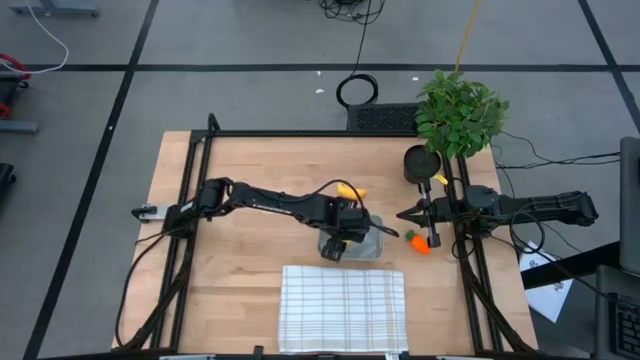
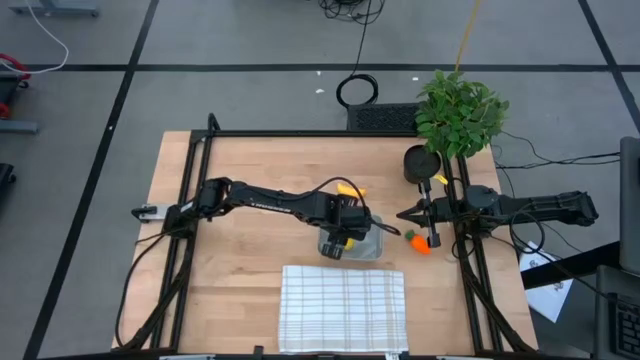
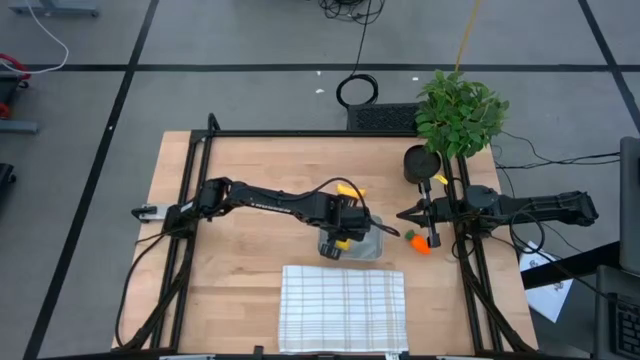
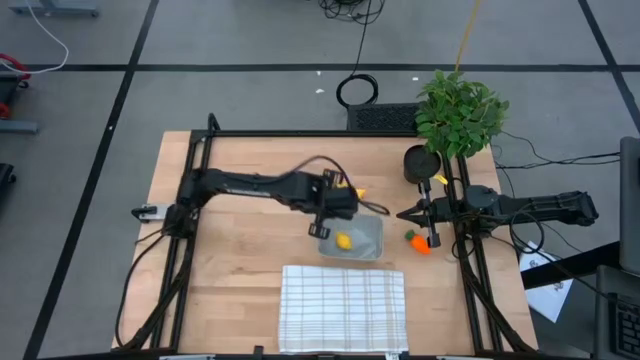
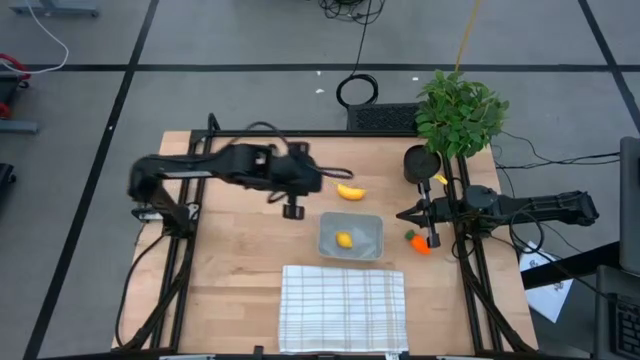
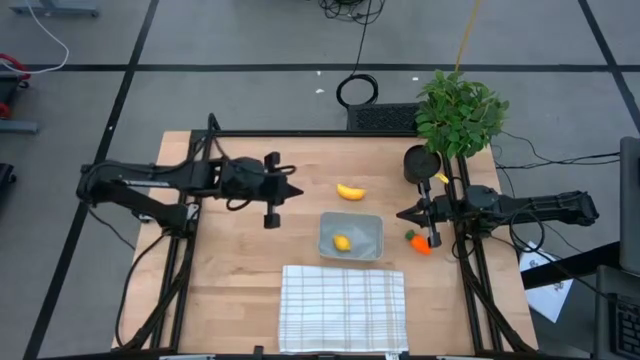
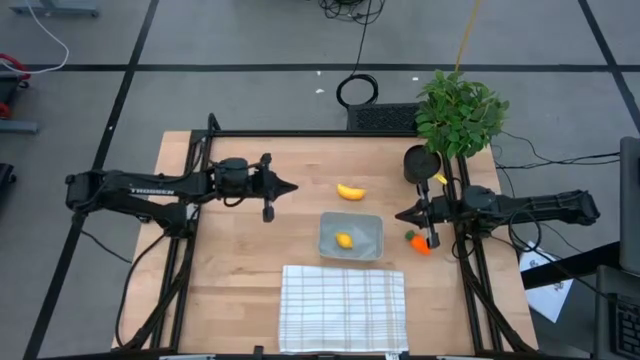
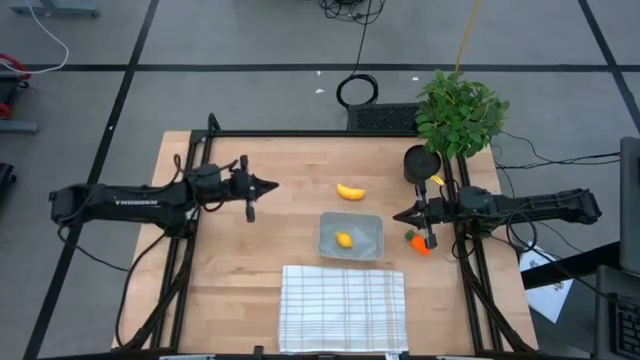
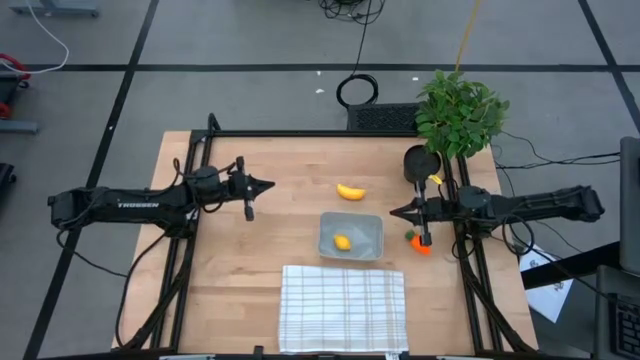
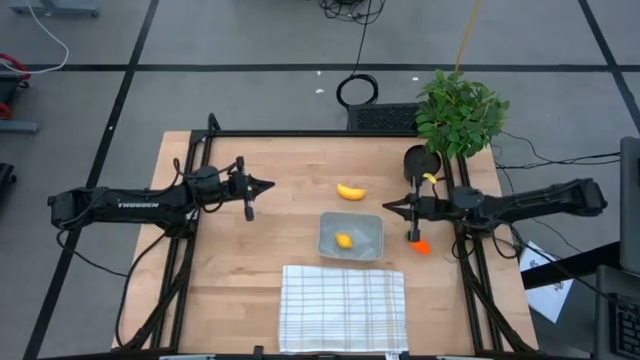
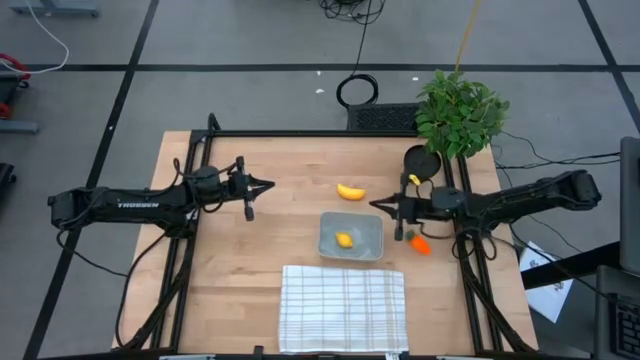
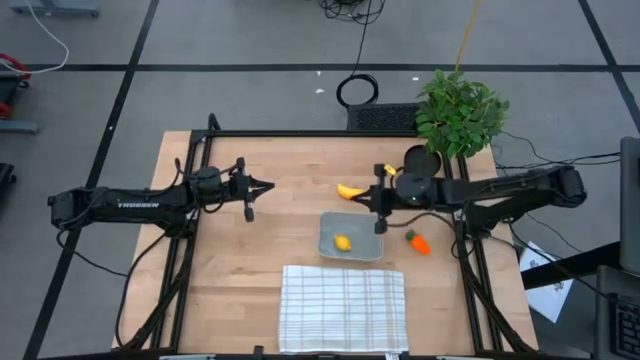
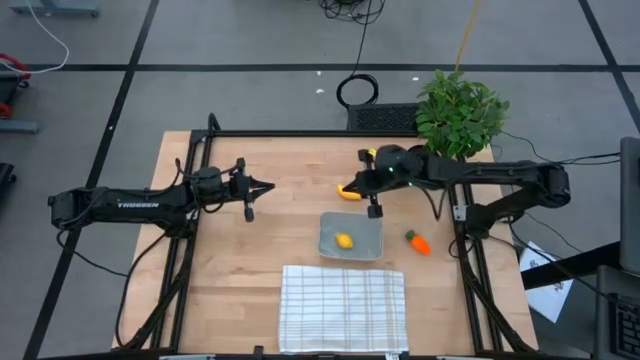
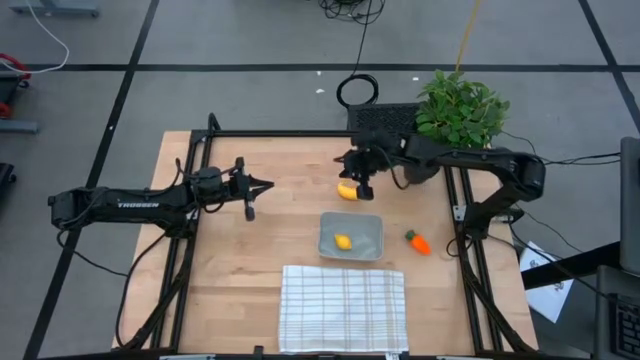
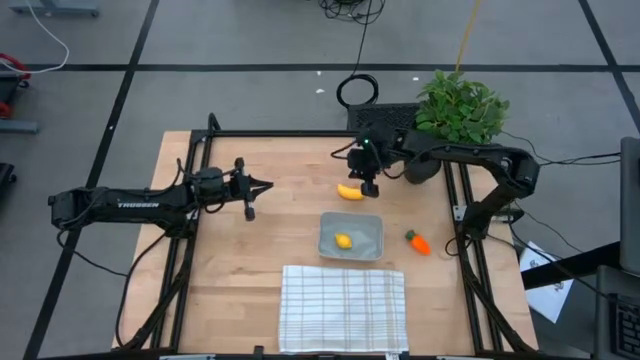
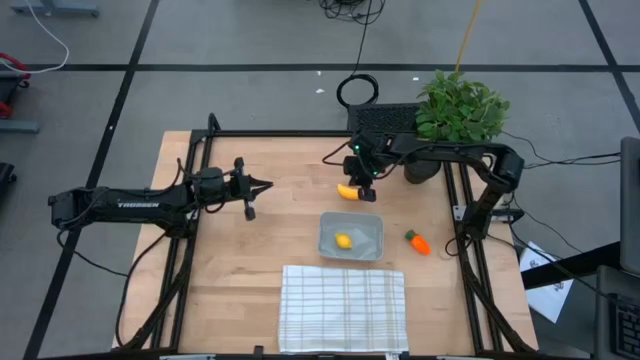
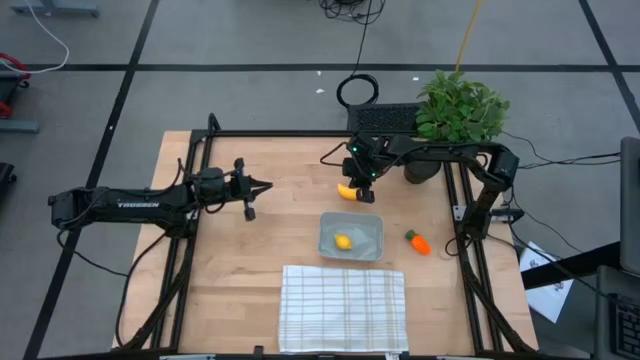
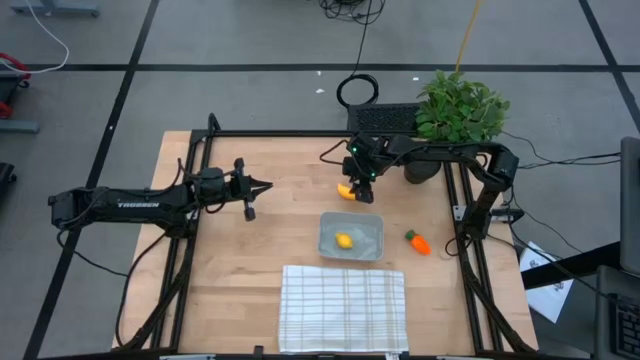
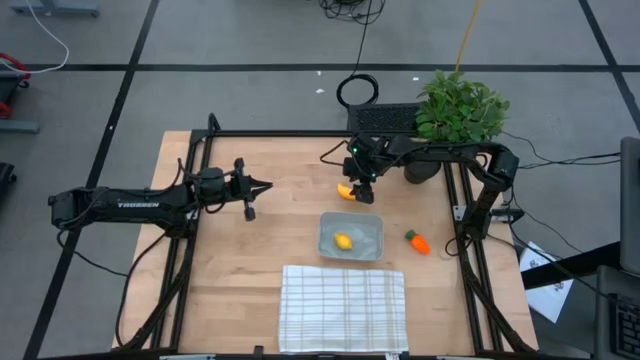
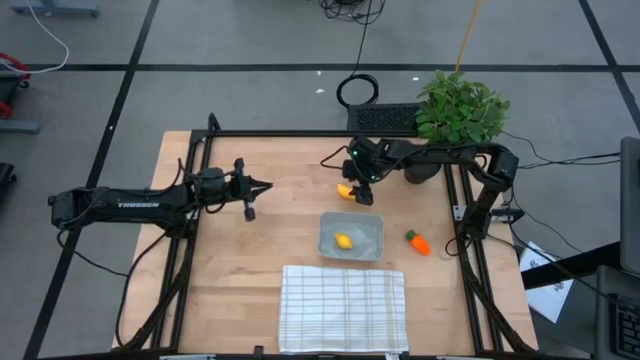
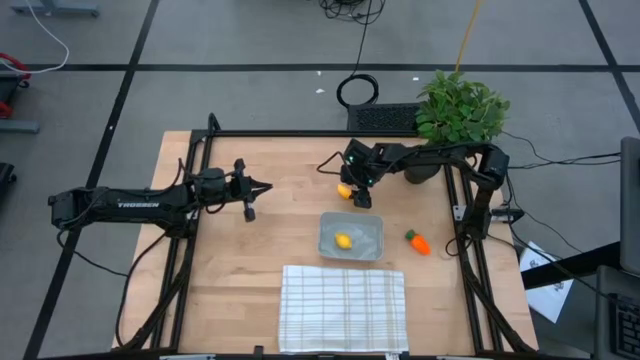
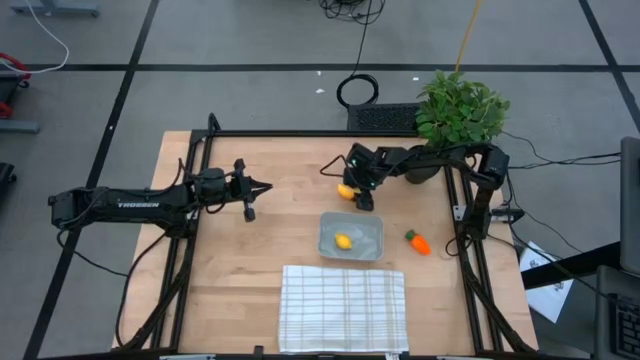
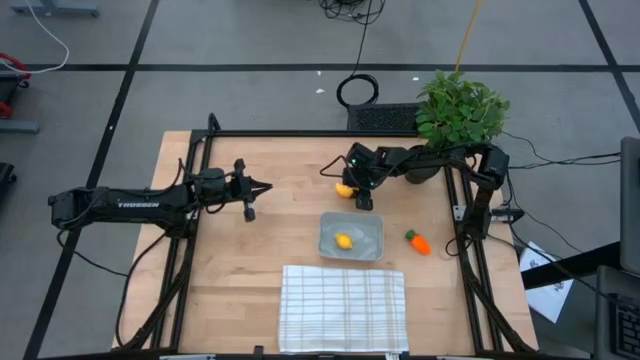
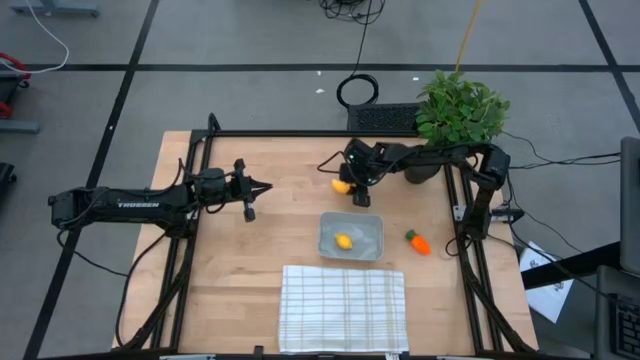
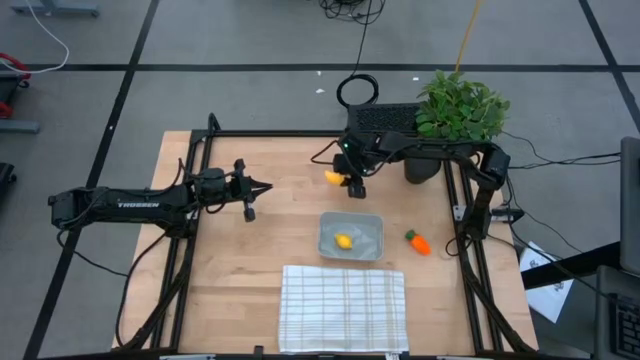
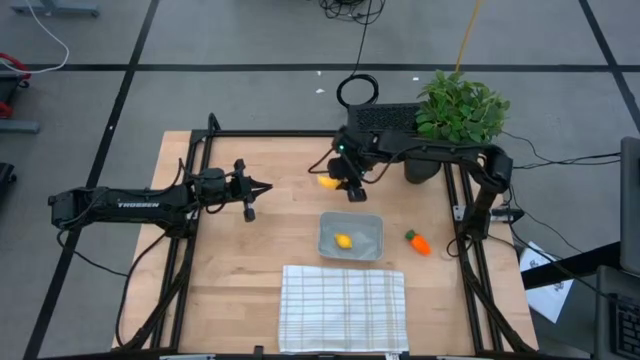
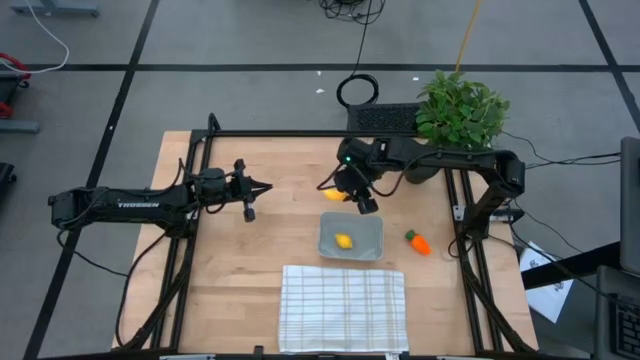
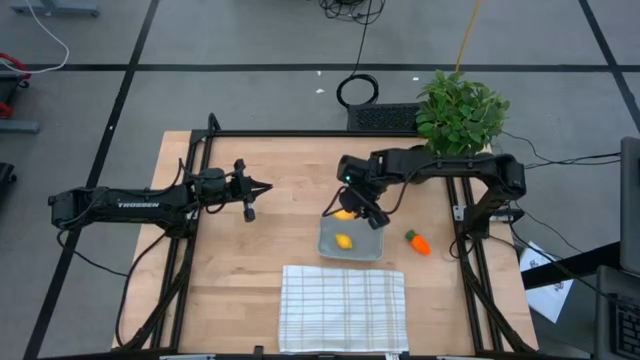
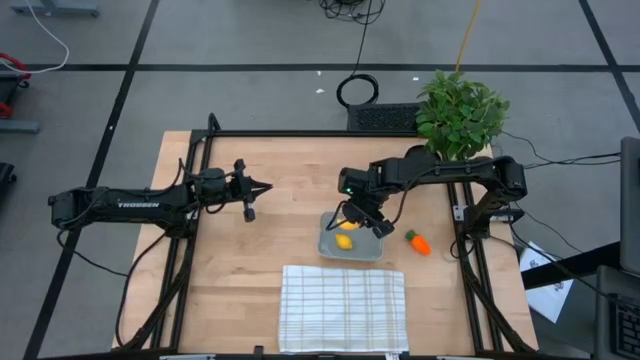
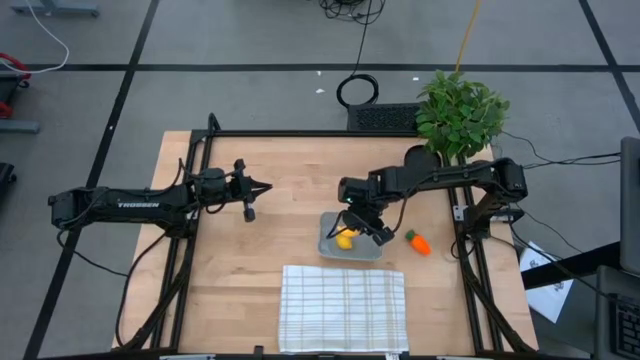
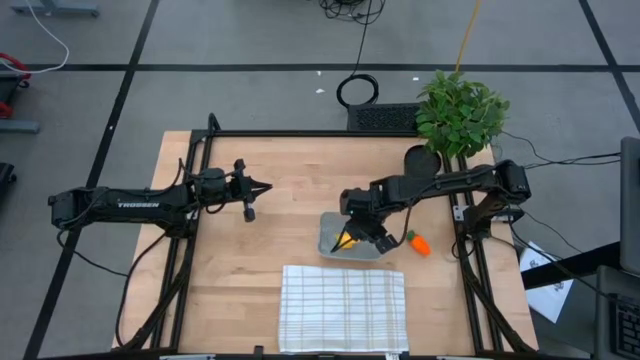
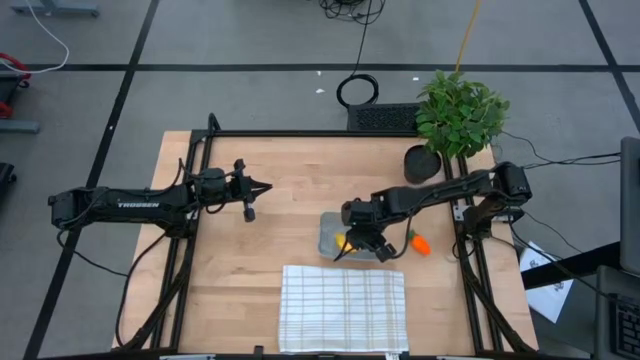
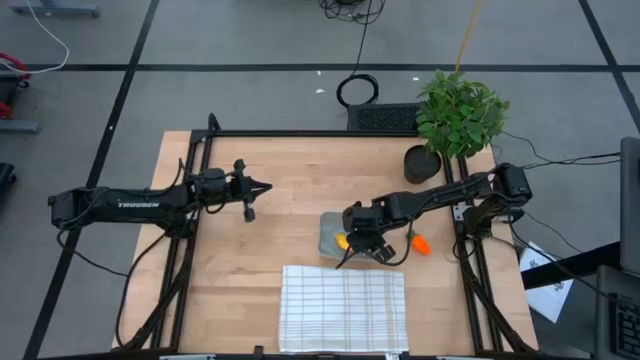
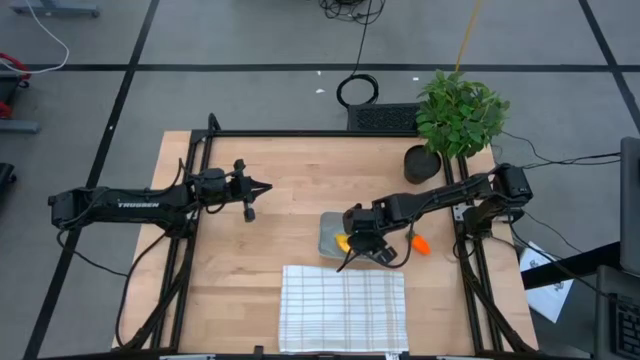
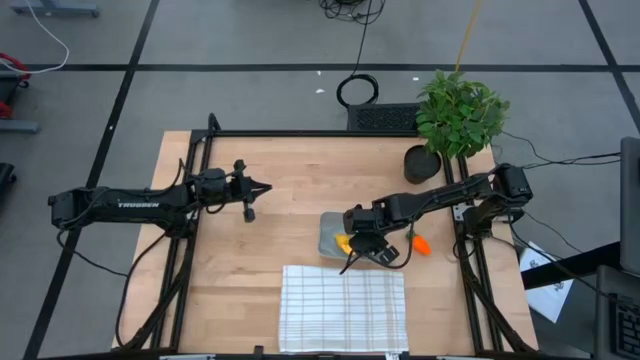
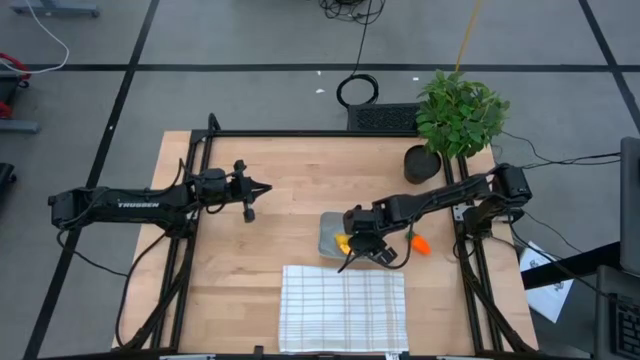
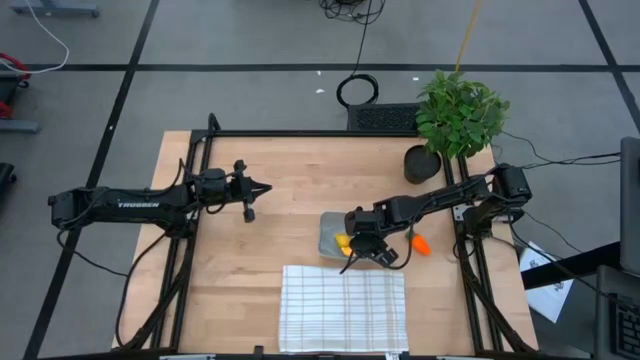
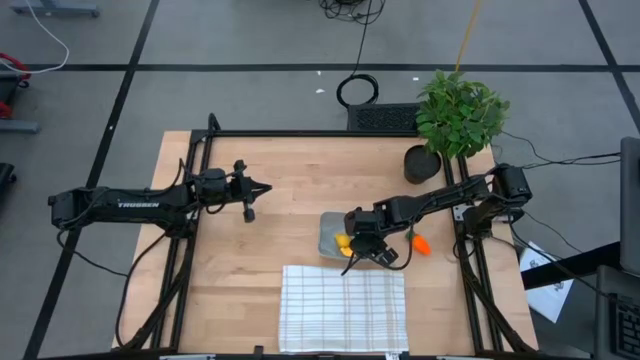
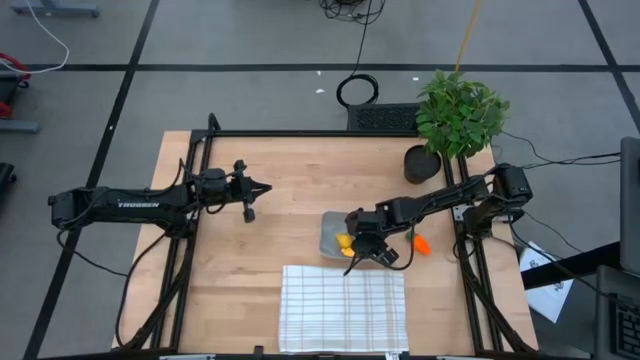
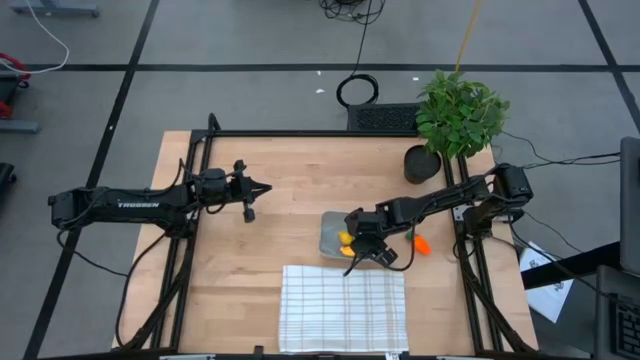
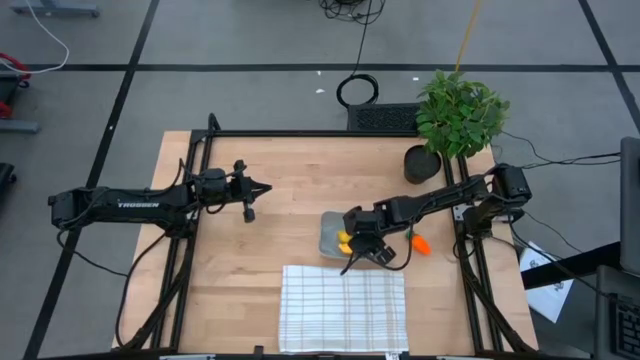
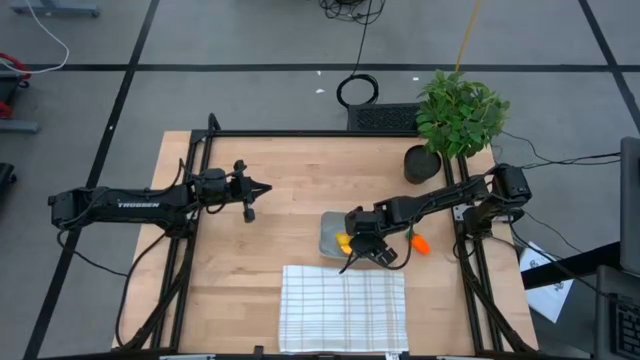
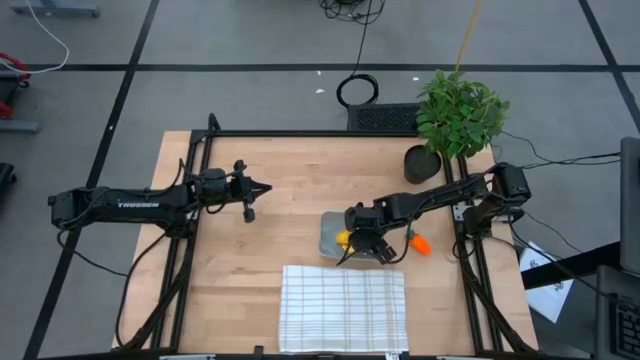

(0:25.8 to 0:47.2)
Task: Pick and placing Produce into tupperware
Put the yellow banana into the gray bin
